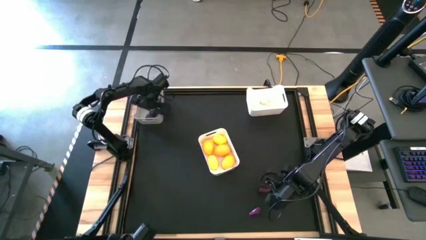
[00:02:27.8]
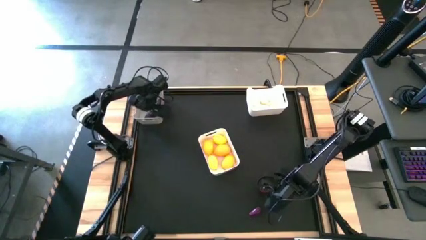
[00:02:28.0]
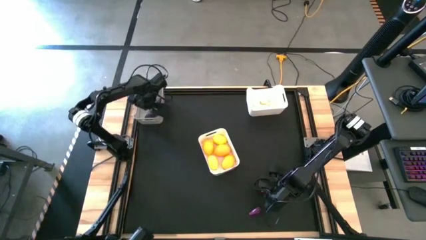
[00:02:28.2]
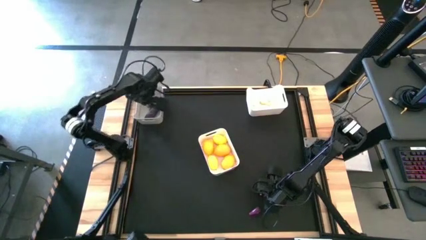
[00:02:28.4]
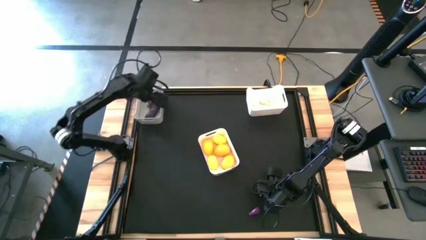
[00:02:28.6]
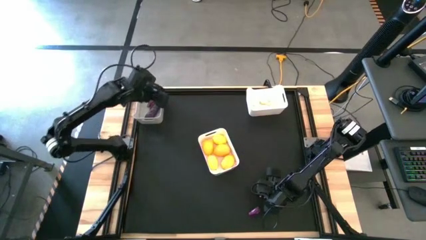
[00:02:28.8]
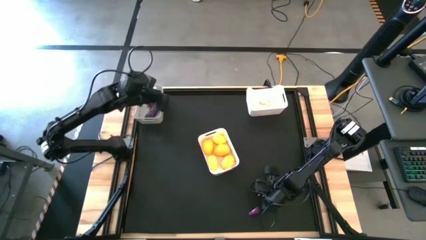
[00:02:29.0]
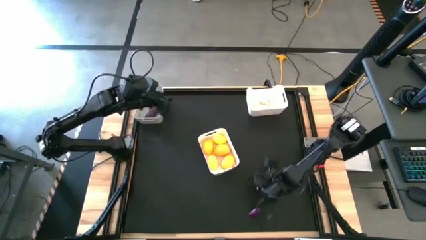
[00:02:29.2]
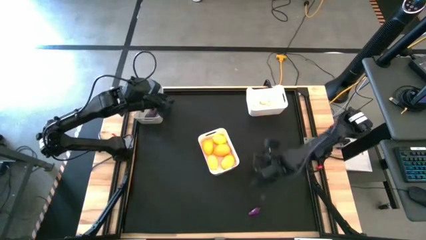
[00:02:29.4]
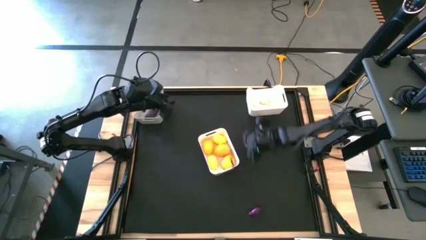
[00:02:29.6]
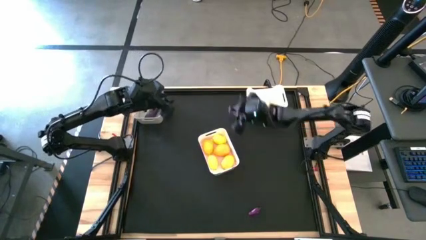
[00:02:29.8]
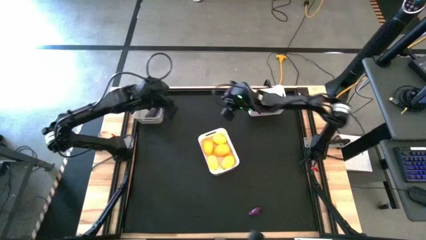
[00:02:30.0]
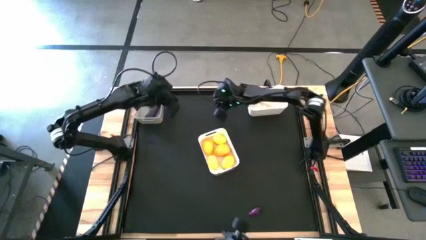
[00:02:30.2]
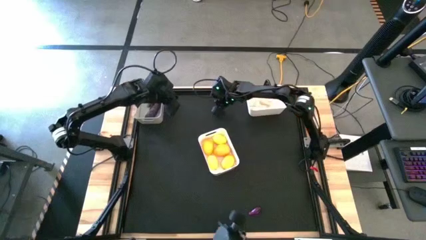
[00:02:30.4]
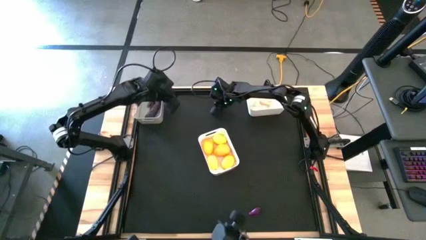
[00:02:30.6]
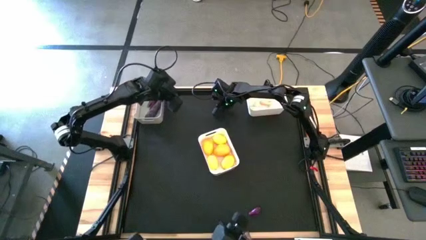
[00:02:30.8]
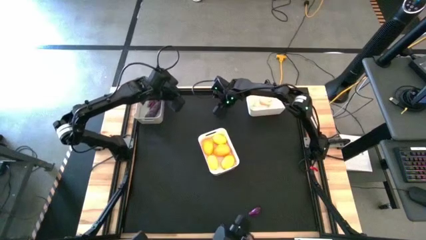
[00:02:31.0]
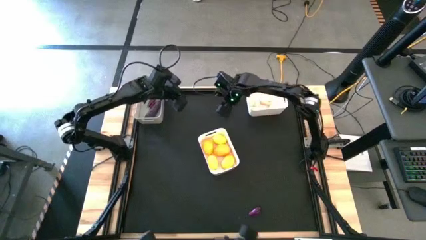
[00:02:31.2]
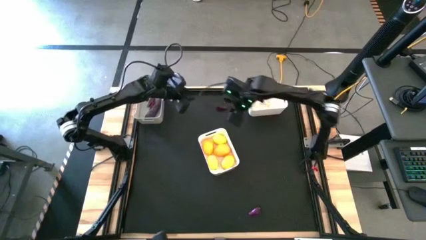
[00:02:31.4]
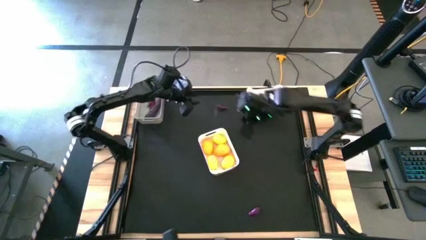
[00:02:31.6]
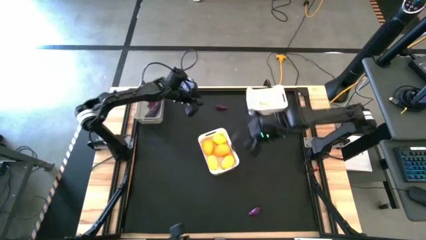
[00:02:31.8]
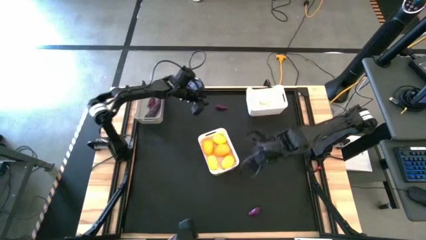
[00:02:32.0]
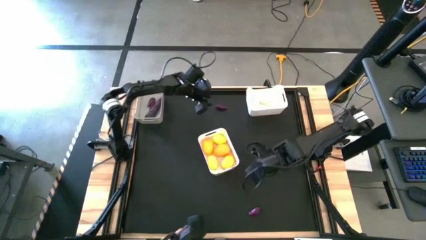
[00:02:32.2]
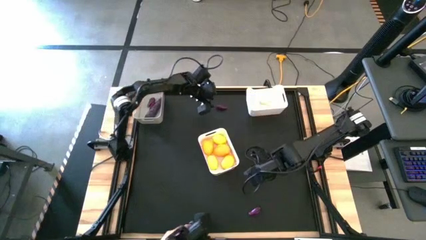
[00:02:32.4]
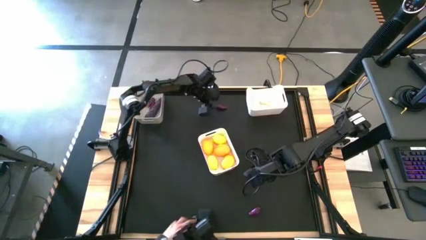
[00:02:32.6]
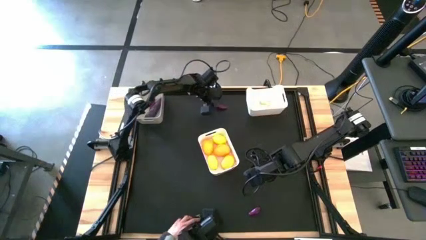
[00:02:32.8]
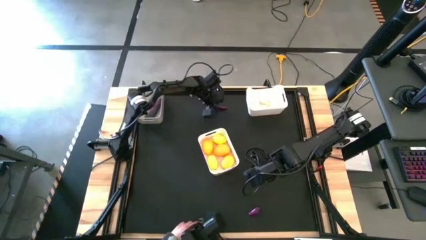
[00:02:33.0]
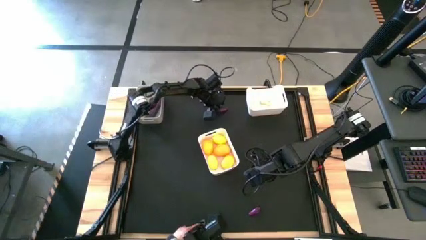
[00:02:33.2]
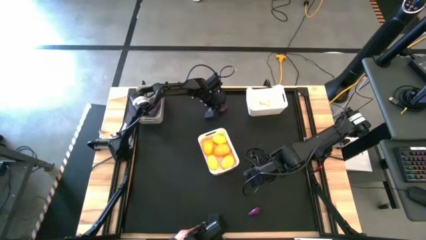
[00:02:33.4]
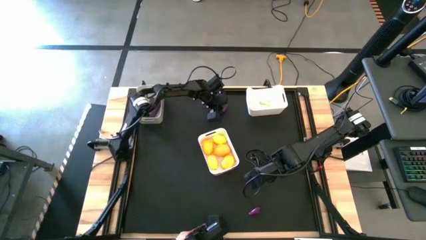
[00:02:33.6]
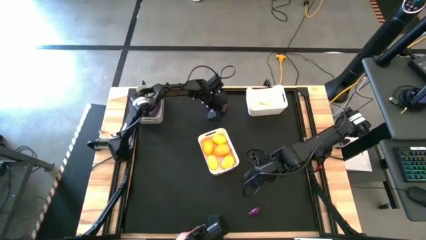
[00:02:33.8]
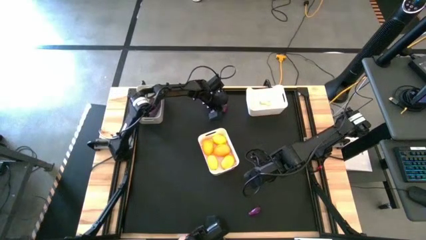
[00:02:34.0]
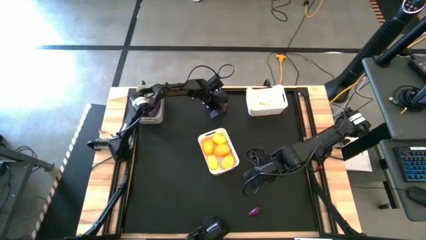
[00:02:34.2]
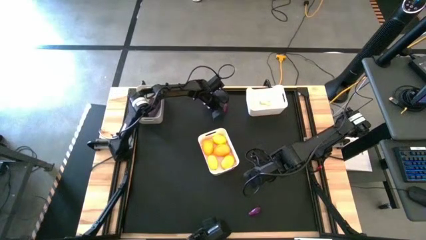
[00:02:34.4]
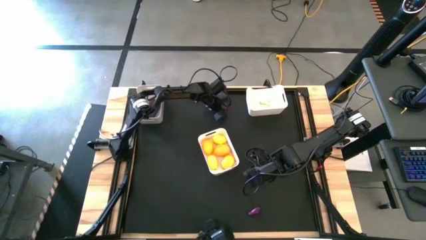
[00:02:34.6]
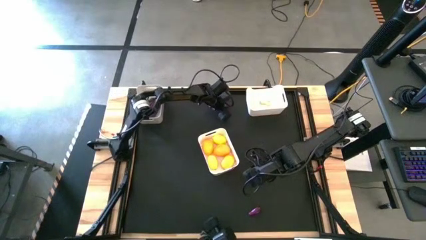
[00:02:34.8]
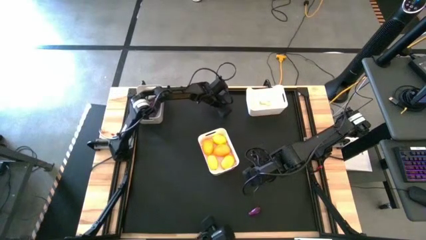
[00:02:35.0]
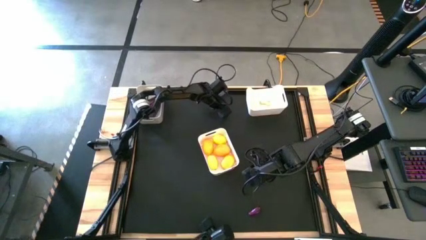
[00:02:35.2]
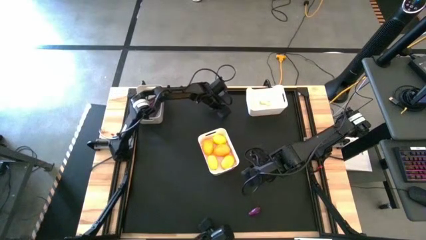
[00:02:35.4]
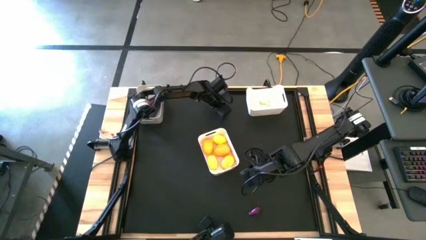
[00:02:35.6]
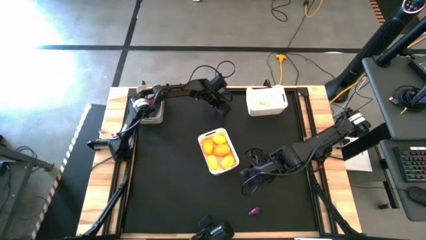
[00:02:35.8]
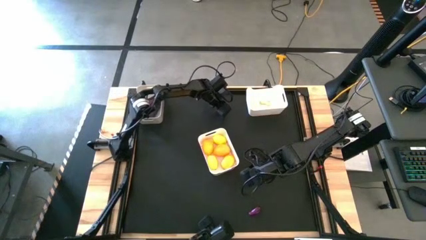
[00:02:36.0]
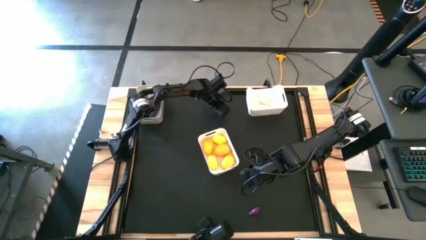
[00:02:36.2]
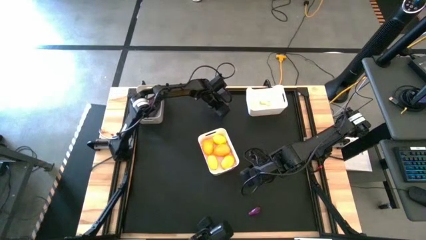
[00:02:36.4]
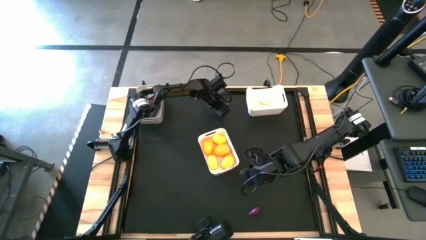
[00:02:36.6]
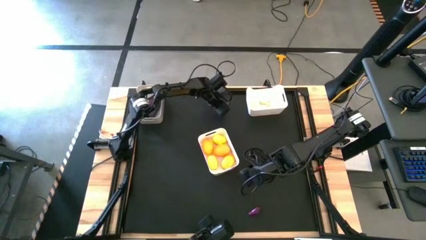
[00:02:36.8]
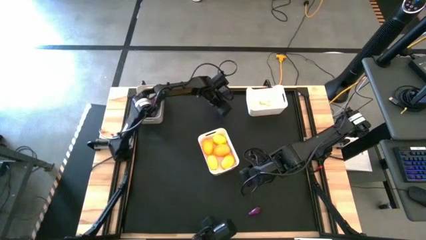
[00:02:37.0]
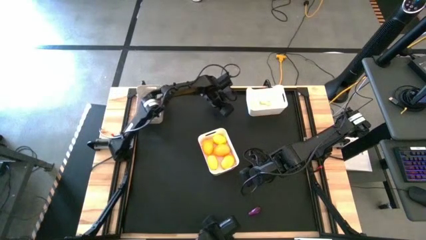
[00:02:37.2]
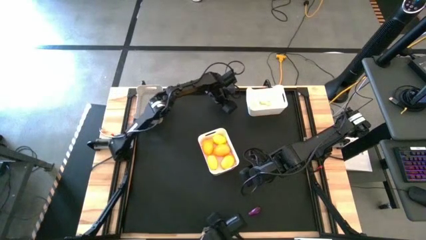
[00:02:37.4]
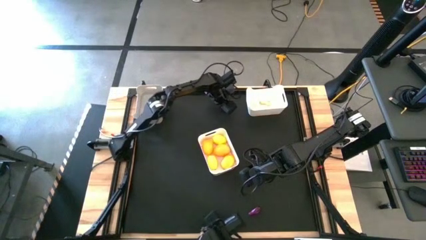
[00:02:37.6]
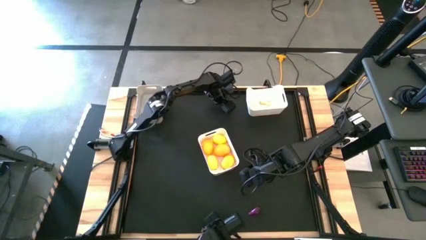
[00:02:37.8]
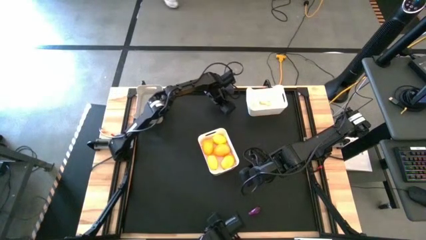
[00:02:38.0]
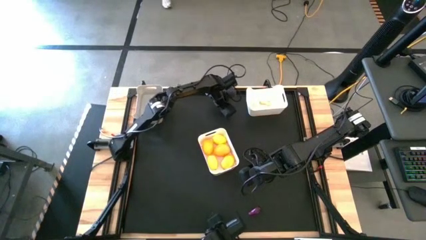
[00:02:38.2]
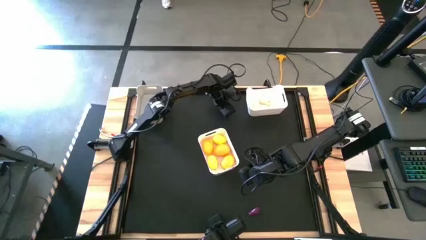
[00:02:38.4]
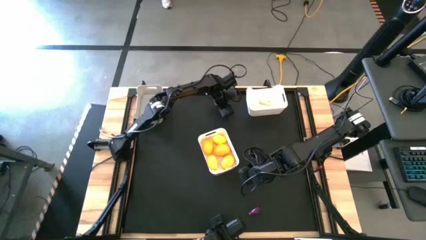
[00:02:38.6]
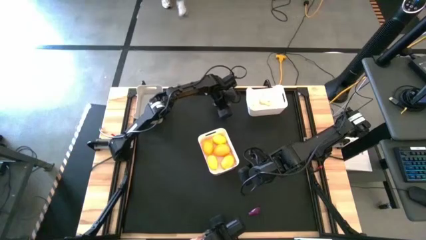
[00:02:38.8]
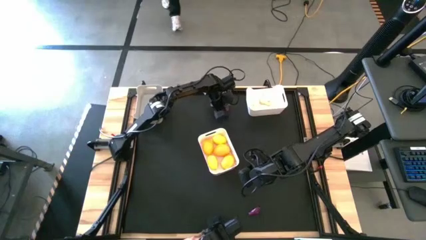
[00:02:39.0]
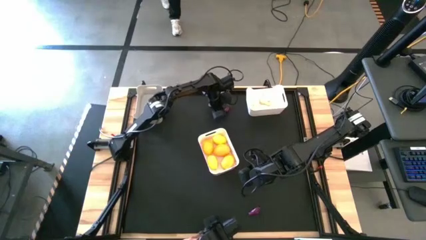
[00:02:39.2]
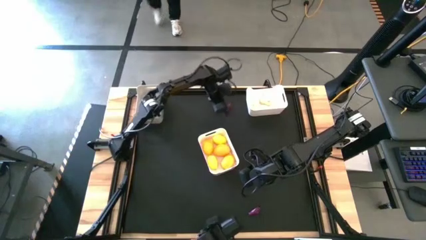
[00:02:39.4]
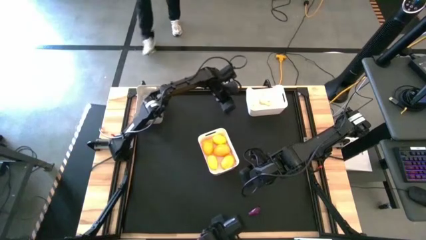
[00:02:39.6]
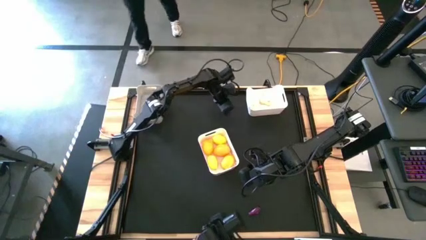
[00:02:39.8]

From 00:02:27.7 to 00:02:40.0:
Task: Sort produce into baskets
Put the eggplant into the gray bin

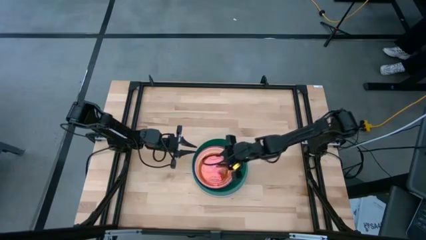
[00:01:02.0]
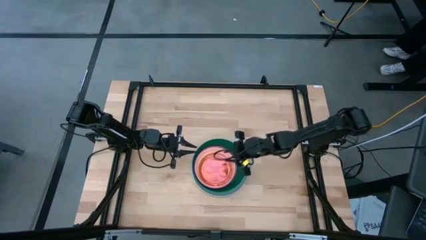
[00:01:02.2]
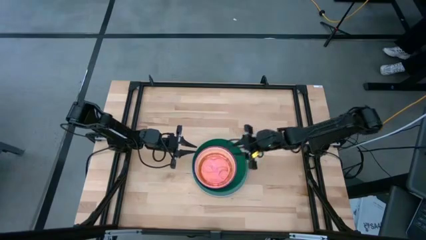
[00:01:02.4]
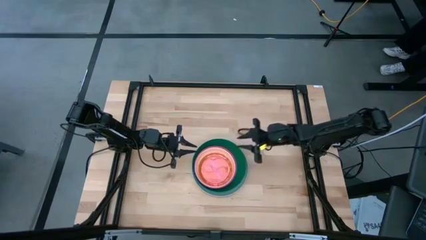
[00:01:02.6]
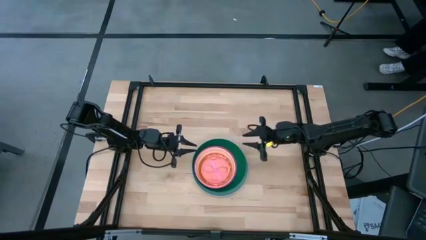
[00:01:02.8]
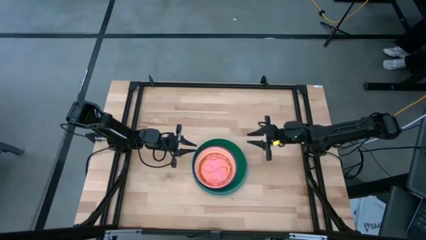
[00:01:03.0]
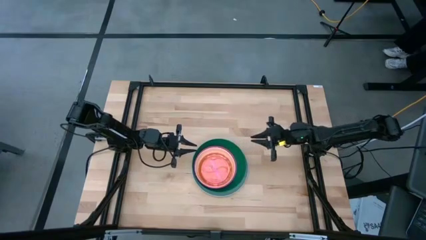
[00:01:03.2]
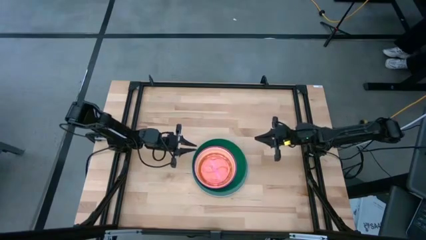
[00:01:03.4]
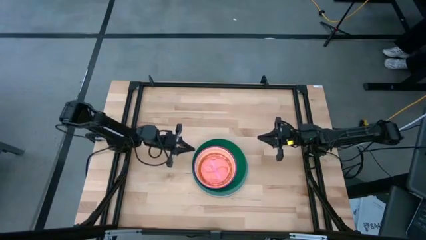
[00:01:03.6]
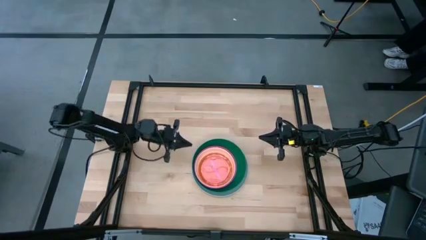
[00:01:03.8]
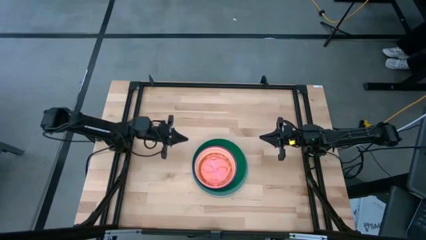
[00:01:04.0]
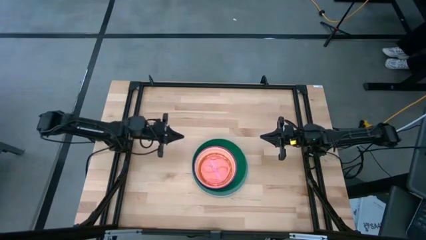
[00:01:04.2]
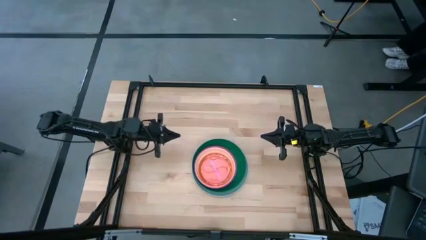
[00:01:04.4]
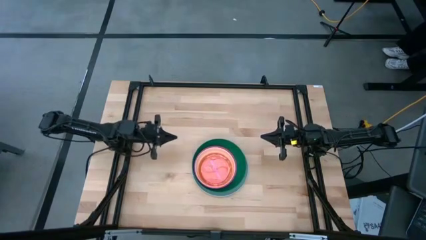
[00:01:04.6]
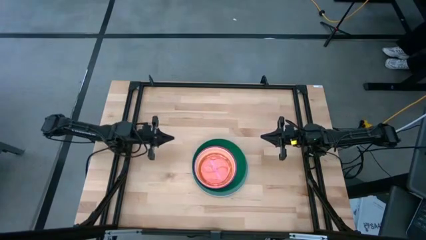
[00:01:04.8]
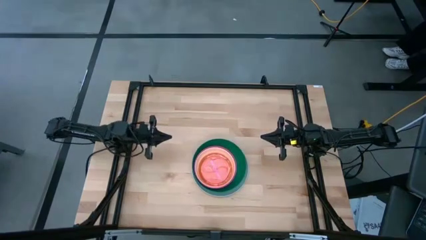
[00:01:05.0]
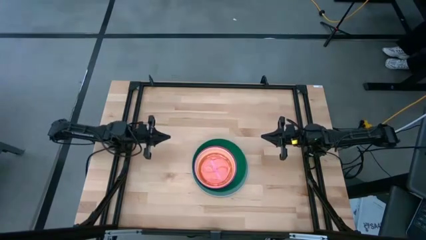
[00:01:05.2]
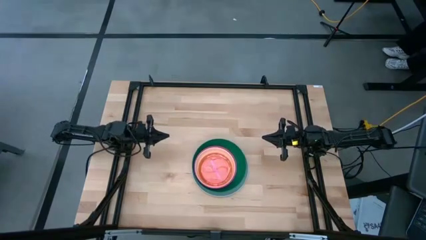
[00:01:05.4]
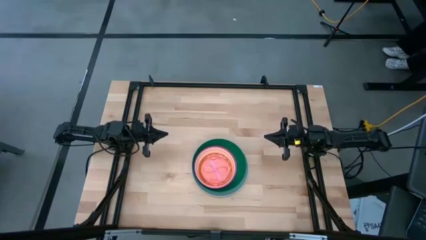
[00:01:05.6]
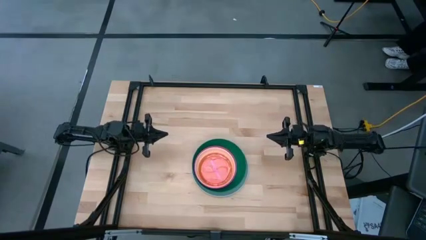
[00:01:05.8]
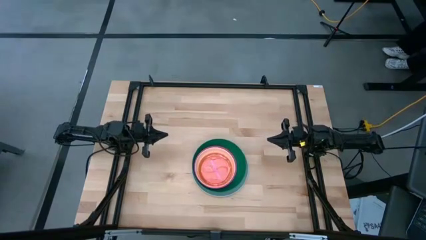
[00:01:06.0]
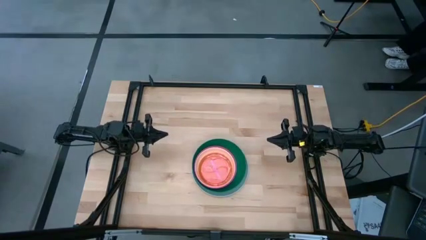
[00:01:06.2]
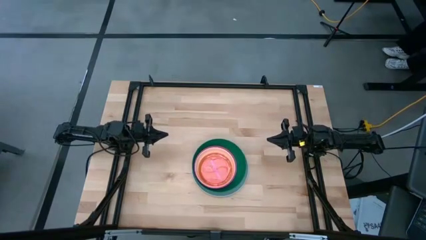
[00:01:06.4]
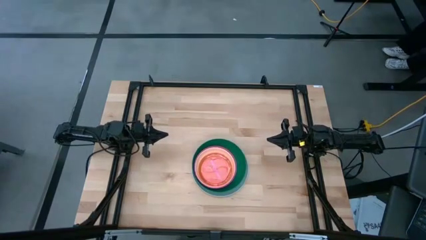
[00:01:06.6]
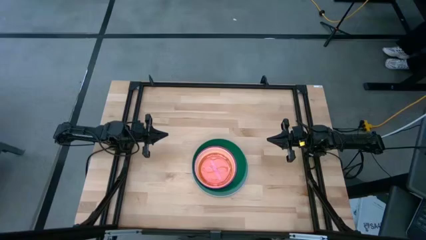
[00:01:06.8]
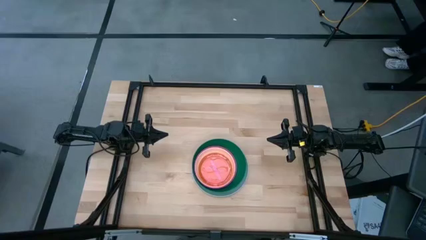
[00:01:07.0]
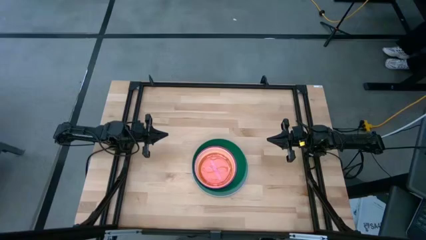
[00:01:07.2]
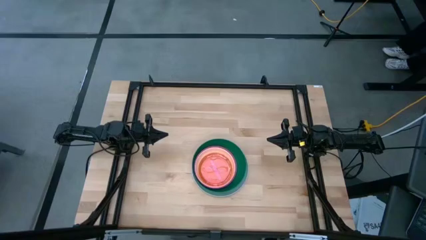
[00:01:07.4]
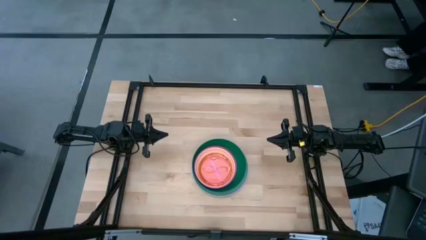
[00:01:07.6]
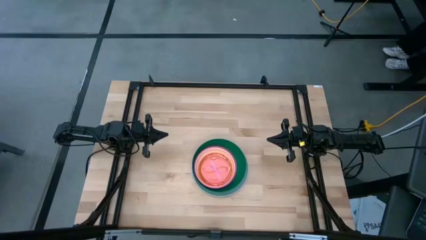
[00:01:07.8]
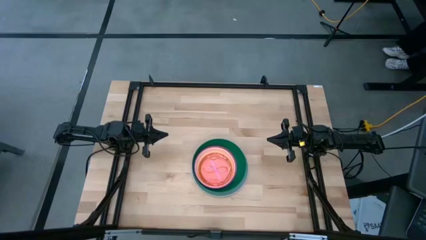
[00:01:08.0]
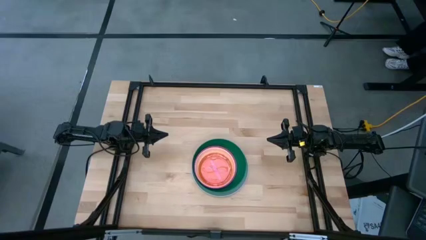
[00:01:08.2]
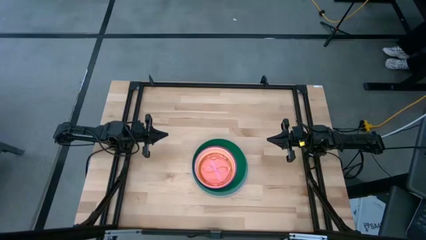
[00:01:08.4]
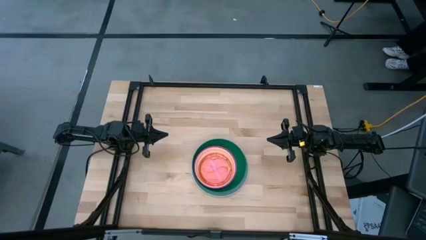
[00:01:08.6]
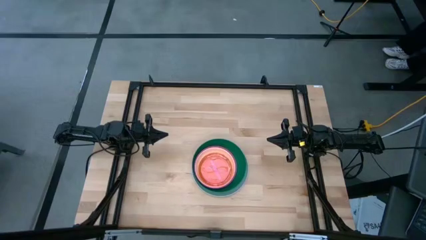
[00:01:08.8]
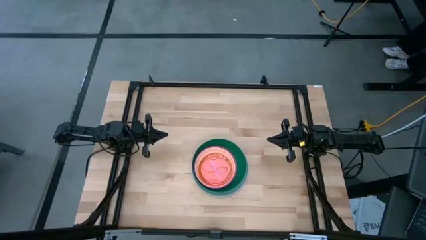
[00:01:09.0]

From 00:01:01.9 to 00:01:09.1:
Task: Stack plastic plates
Return to Home Position
